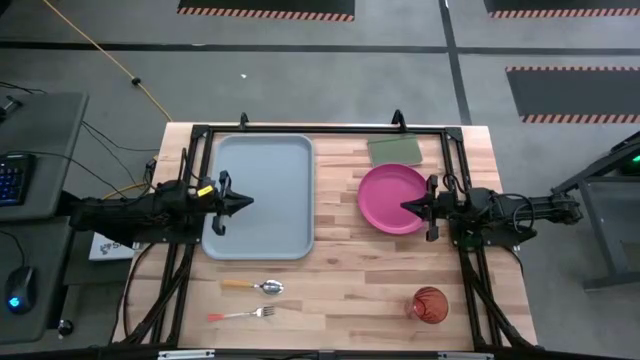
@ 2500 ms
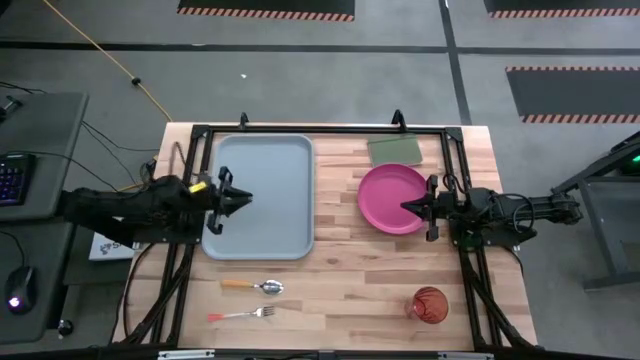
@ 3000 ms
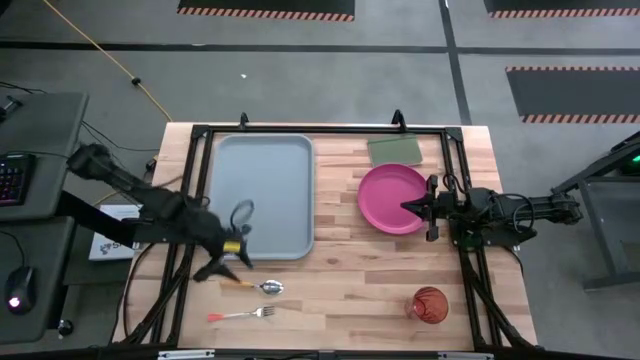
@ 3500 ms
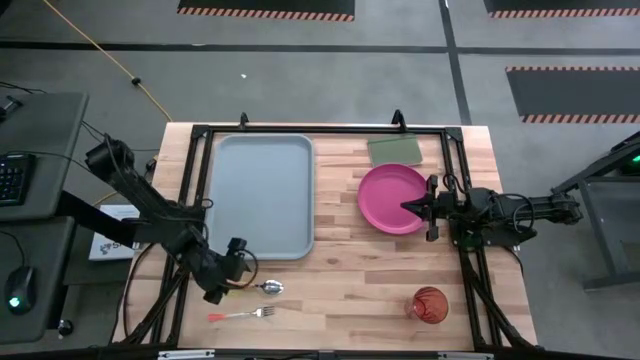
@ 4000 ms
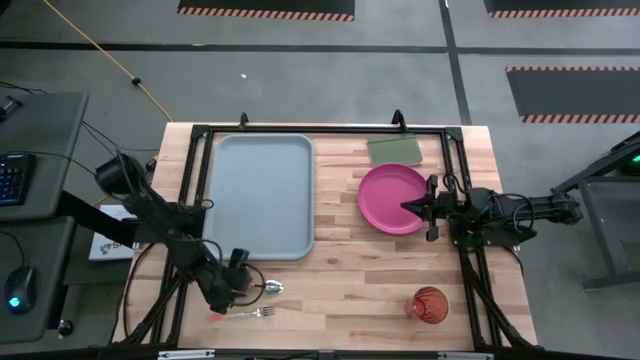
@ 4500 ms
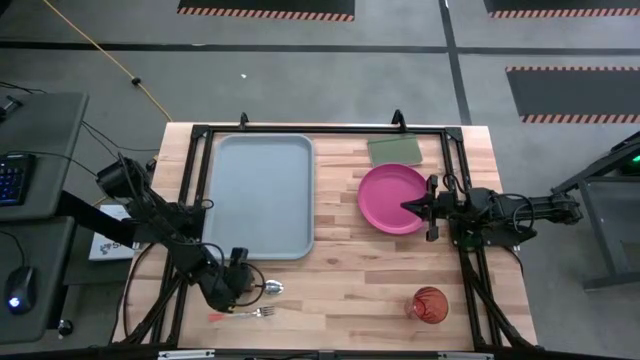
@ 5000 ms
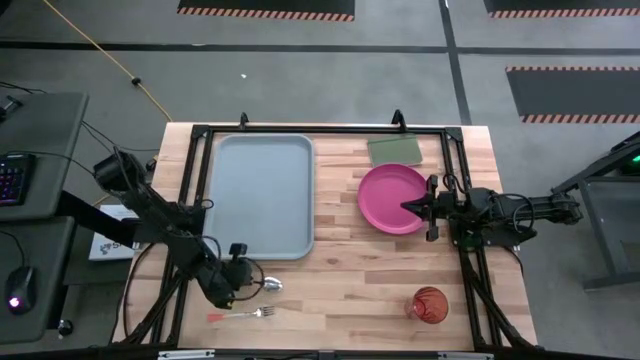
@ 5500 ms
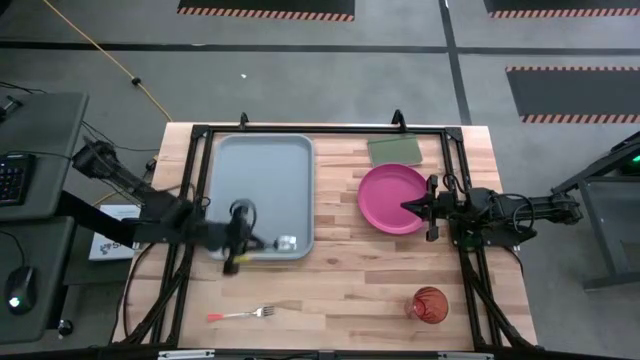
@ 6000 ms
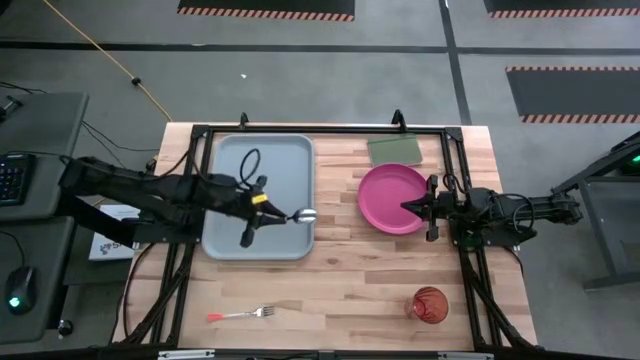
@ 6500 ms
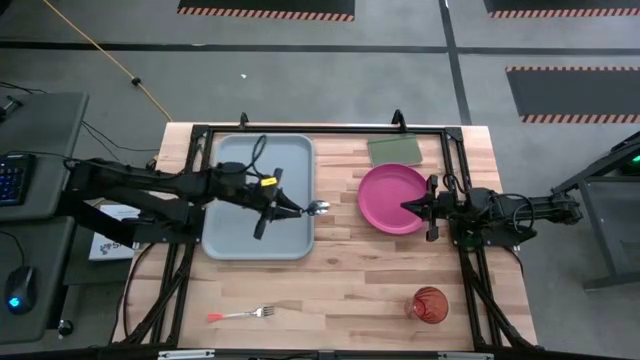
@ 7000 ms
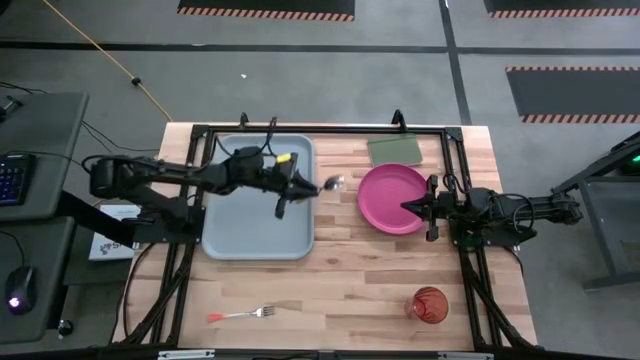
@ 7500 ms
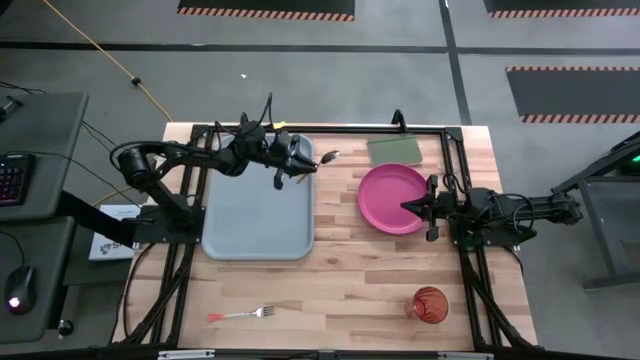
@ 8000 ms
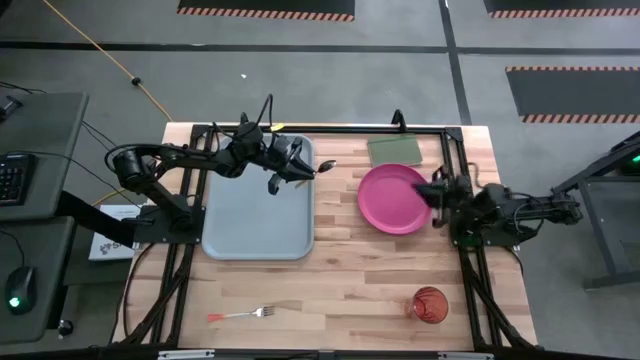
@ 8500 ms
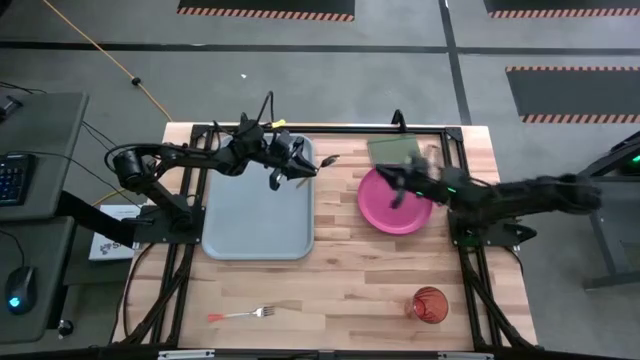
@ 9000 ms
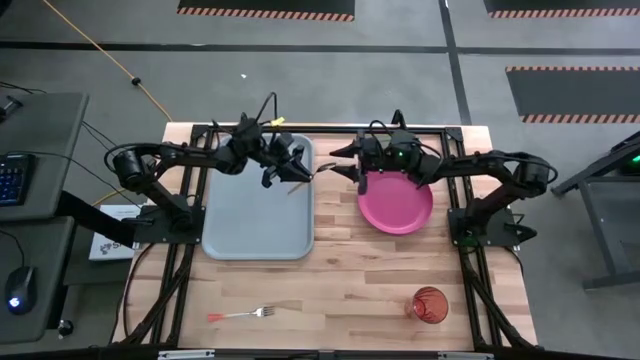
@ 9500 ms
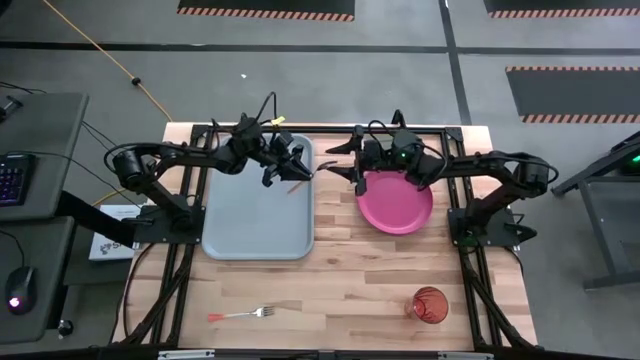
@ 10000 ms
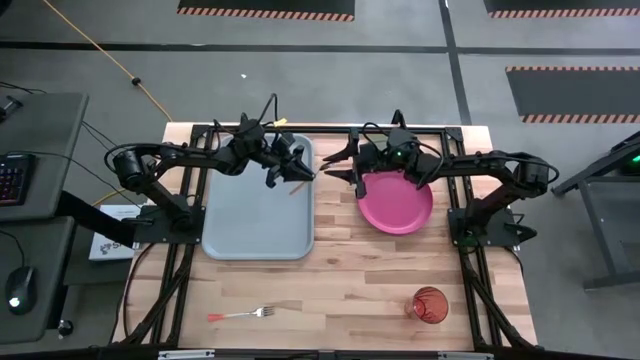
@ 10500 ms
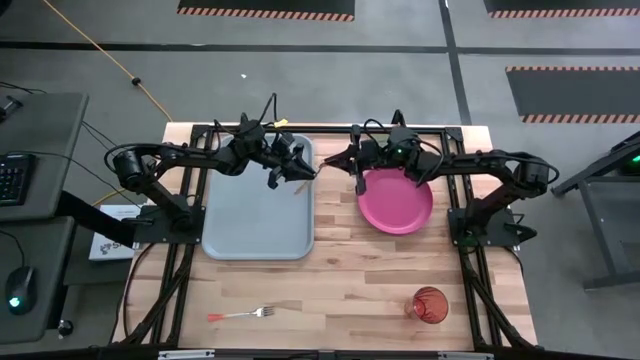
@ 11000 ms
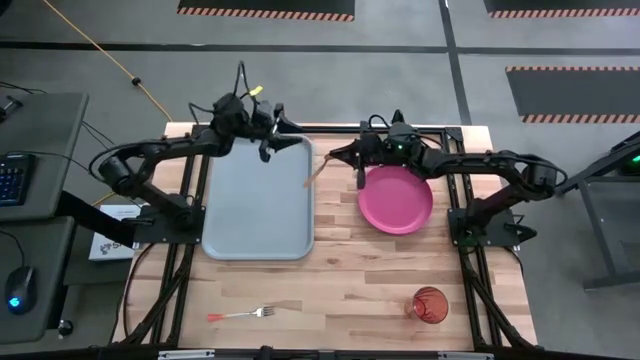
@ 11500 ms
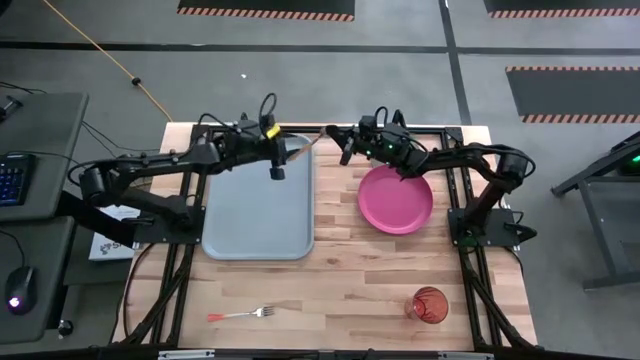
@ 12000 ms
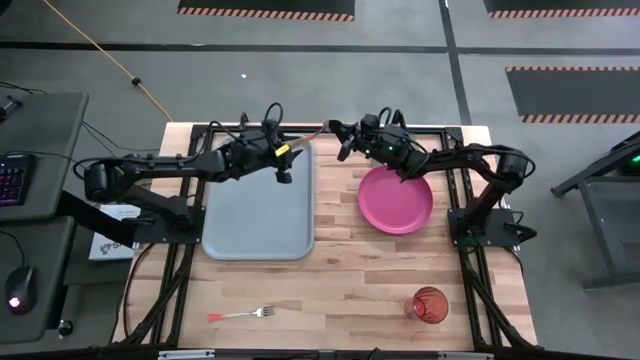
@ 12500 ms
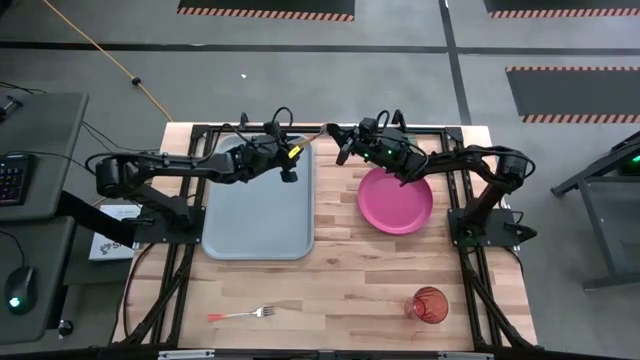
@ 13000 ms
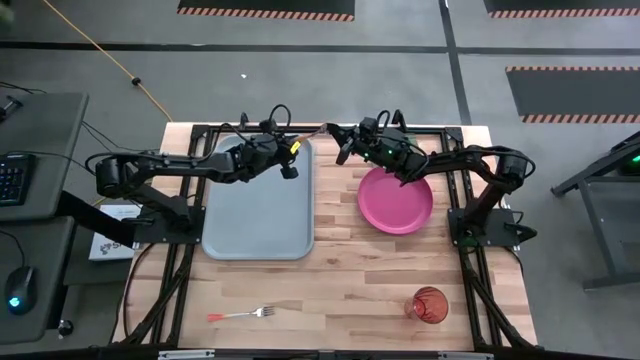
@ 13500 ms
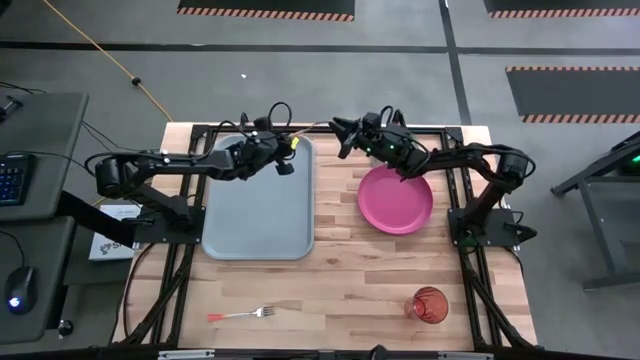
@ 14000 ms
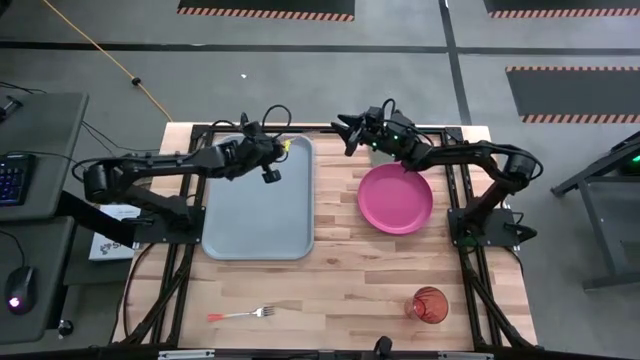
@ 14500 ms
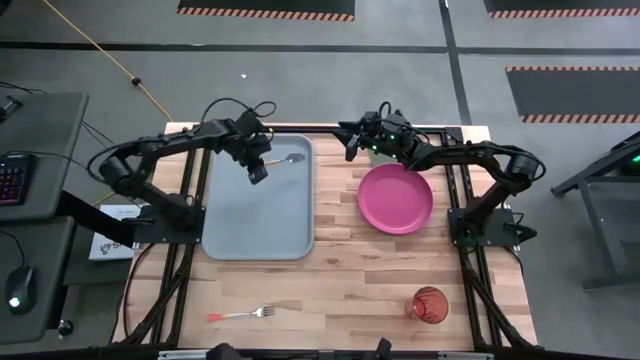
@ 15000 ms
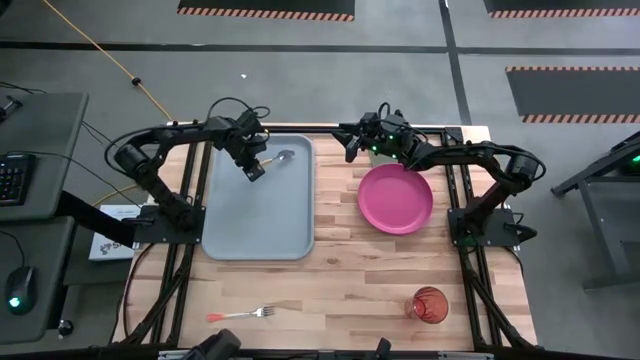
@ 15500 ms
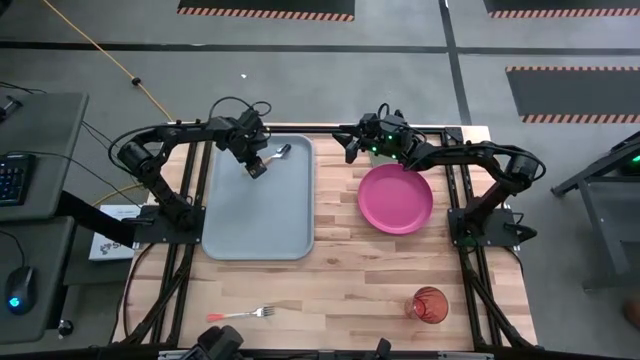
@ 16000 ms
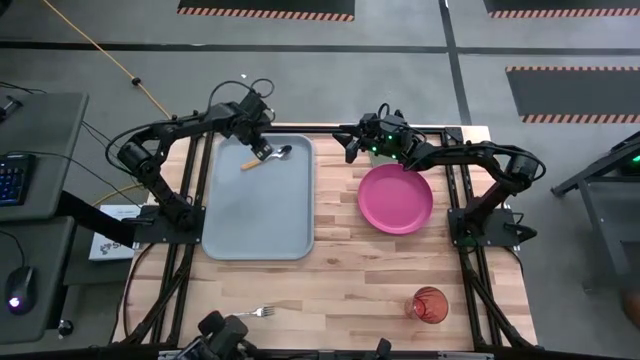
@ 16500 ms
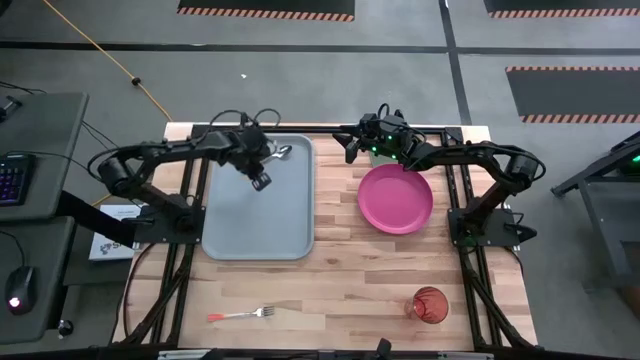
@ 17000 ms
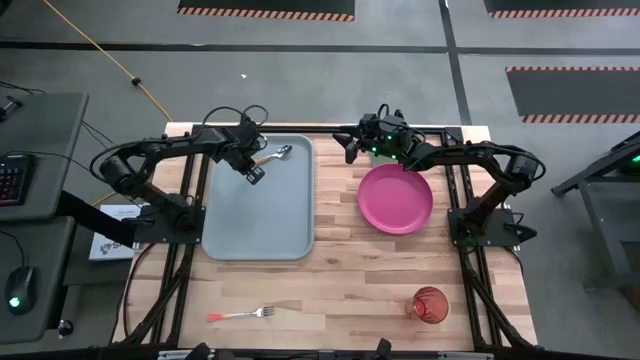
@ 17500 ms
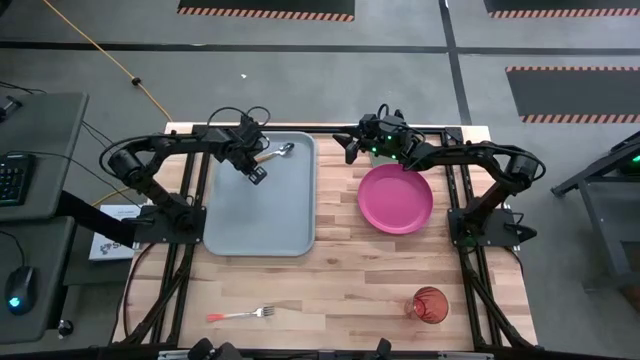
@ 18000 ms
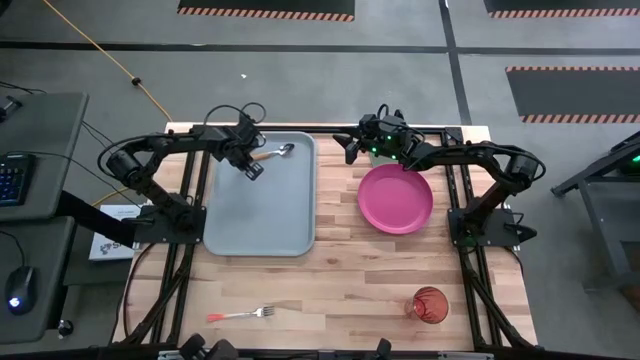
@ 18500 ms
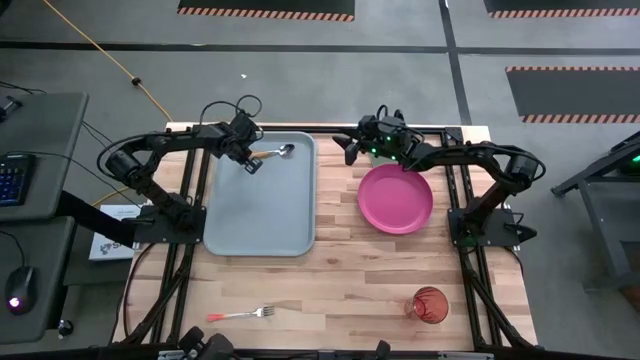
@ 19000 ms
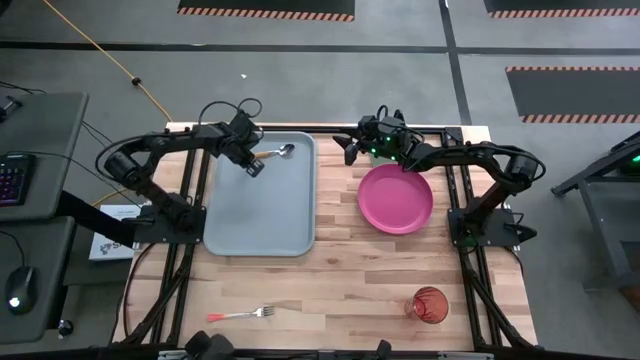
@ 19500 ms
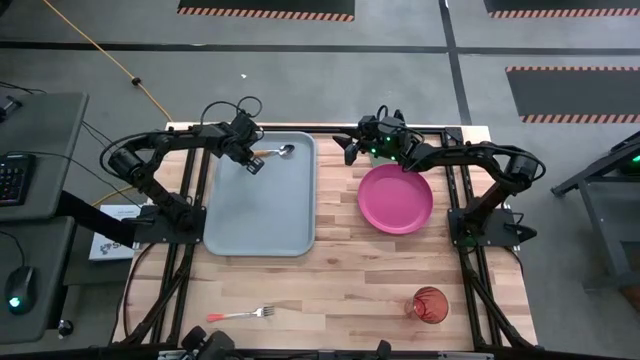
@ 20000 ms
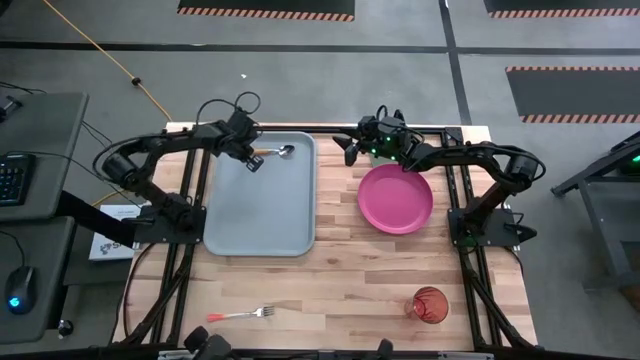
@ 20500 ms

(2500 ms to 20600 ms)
Task: Pick and place plate/cup/fork/spoon on tray
Put the yellow spoon on the top of the gray serving tray
